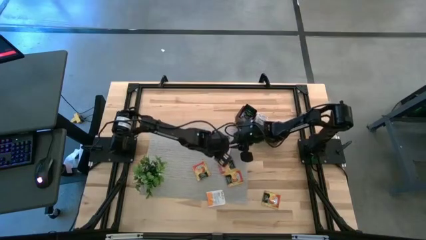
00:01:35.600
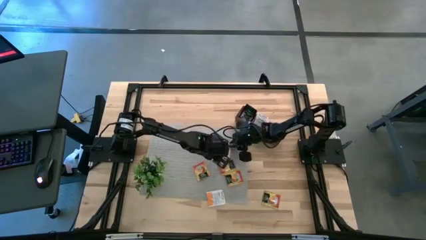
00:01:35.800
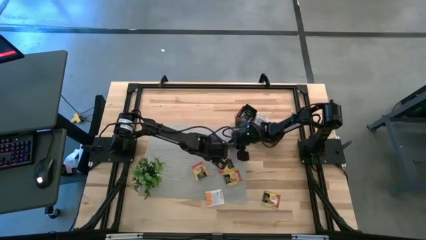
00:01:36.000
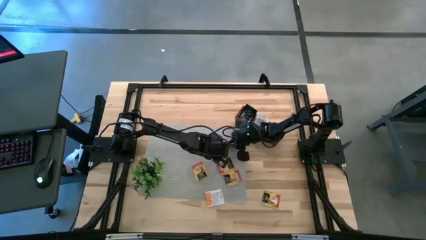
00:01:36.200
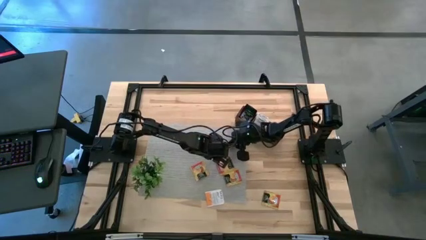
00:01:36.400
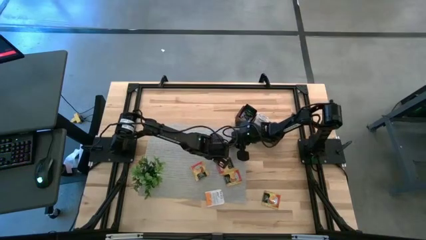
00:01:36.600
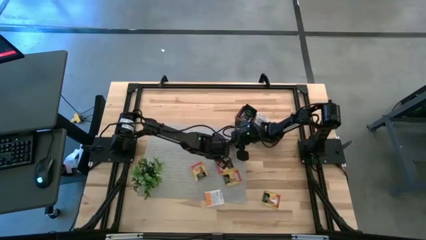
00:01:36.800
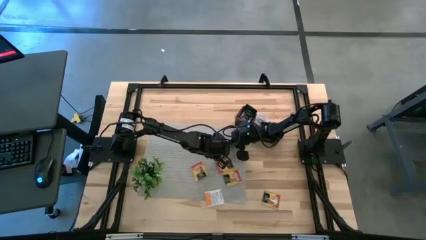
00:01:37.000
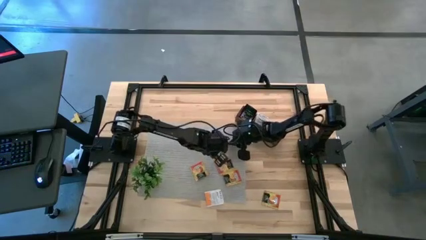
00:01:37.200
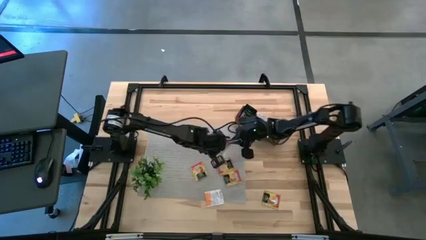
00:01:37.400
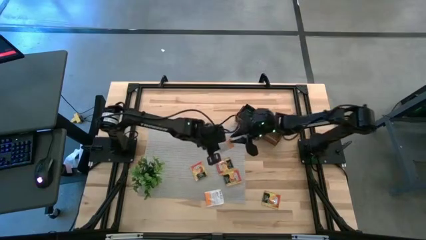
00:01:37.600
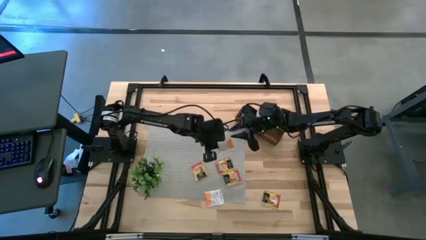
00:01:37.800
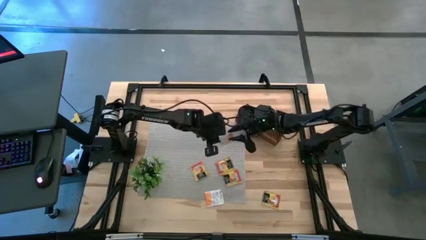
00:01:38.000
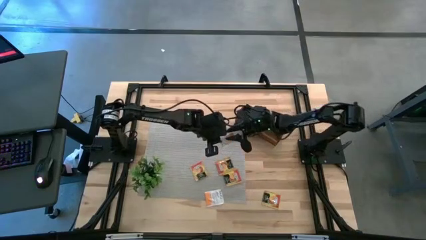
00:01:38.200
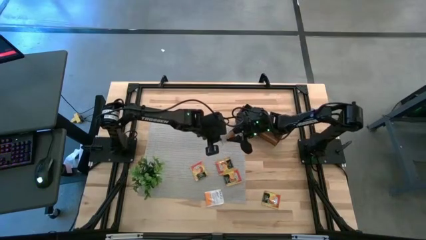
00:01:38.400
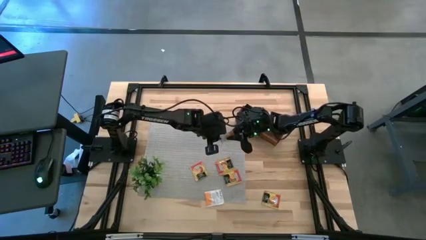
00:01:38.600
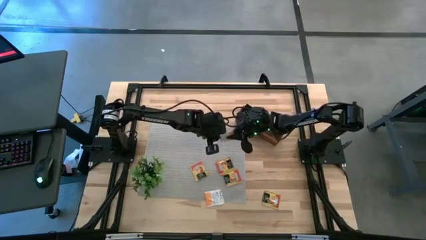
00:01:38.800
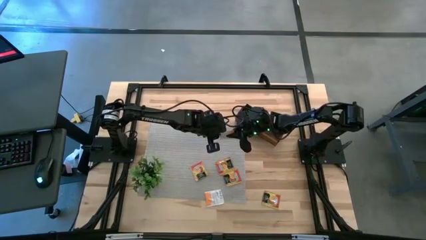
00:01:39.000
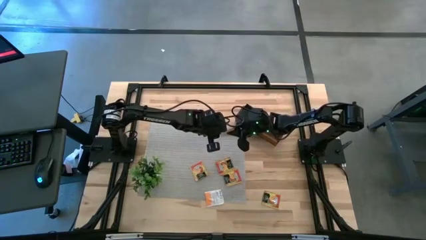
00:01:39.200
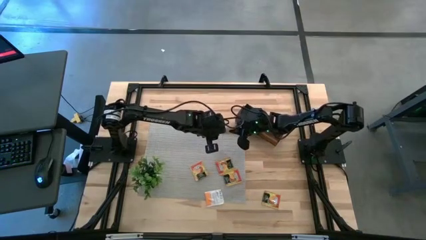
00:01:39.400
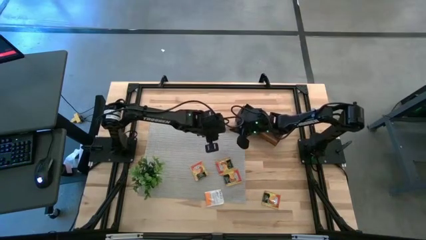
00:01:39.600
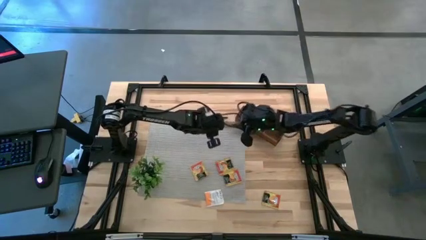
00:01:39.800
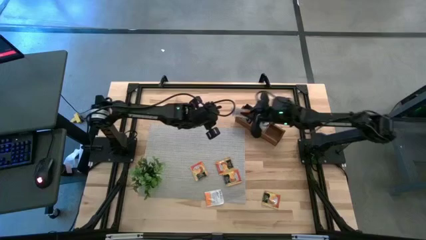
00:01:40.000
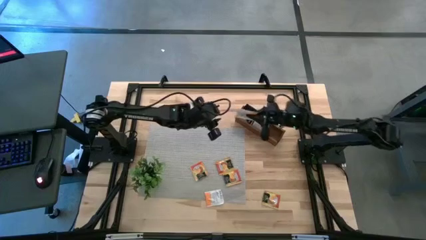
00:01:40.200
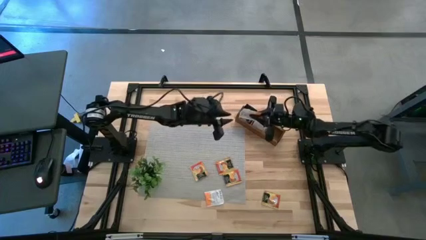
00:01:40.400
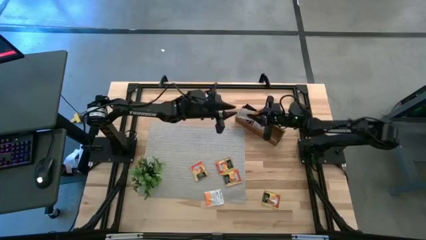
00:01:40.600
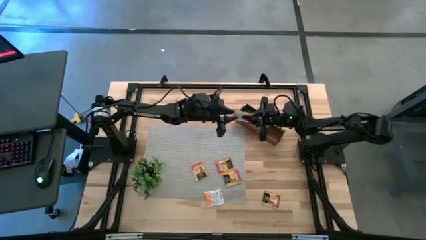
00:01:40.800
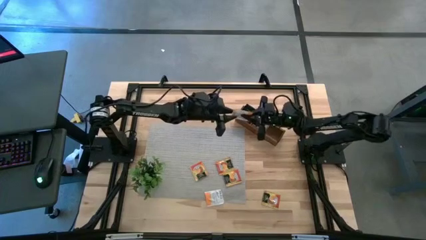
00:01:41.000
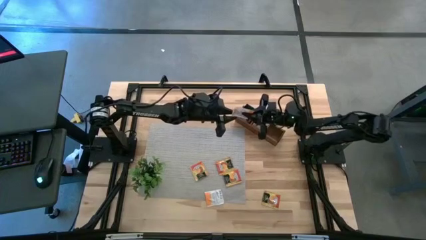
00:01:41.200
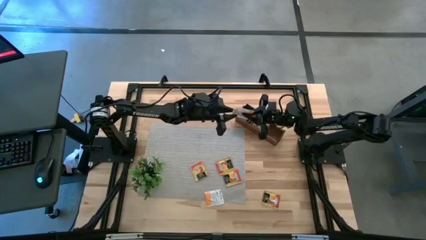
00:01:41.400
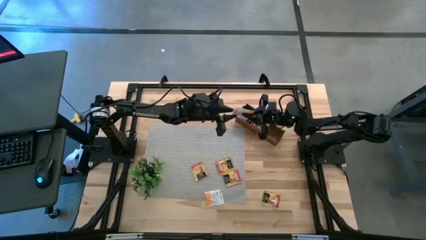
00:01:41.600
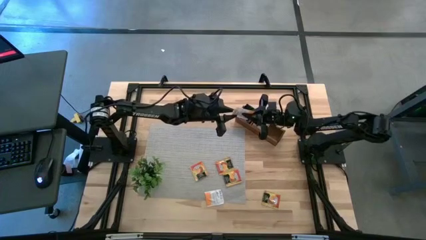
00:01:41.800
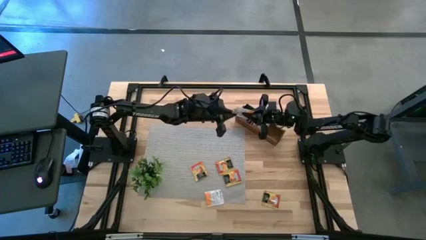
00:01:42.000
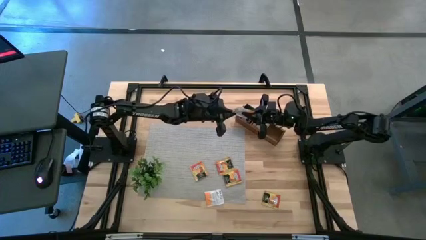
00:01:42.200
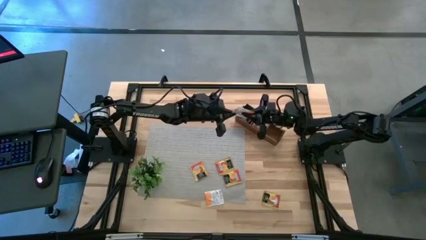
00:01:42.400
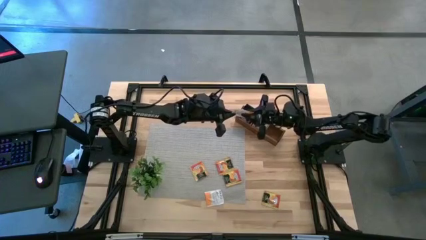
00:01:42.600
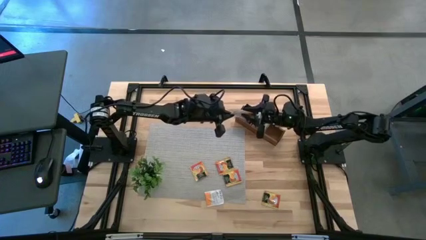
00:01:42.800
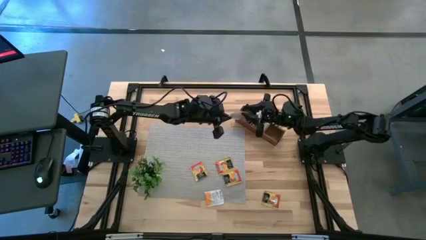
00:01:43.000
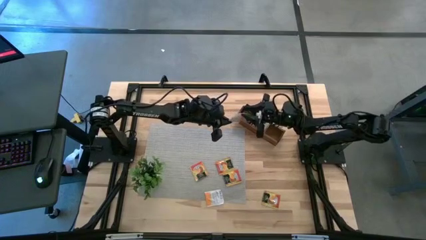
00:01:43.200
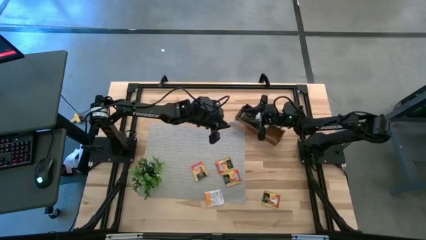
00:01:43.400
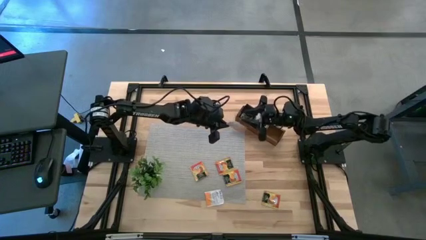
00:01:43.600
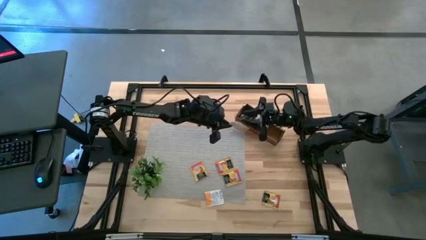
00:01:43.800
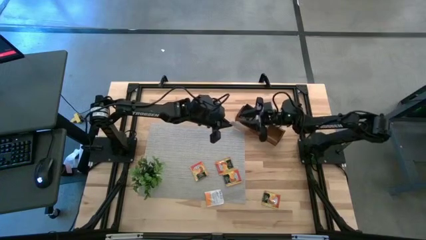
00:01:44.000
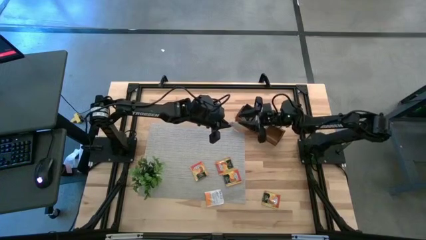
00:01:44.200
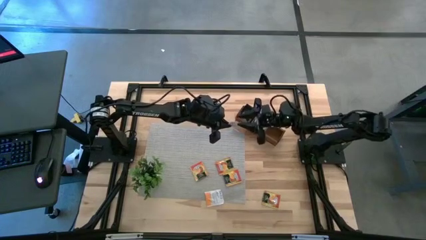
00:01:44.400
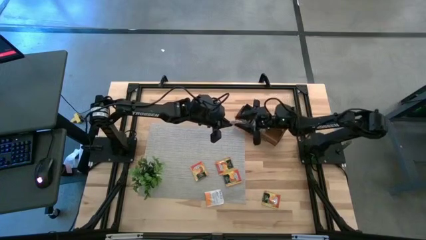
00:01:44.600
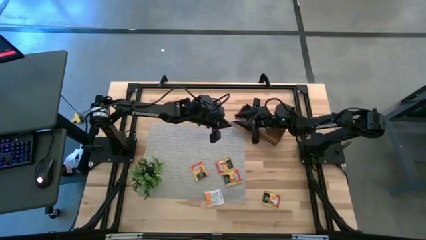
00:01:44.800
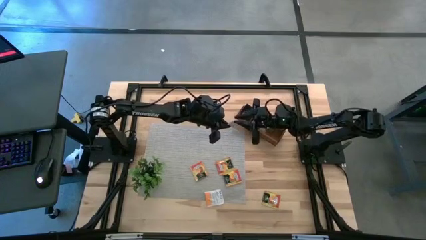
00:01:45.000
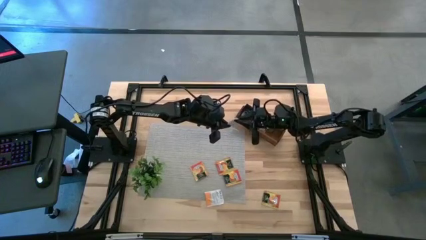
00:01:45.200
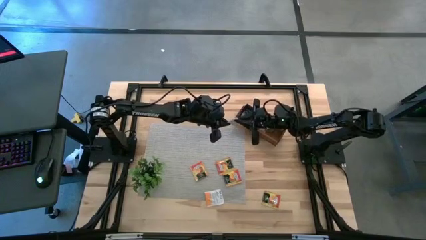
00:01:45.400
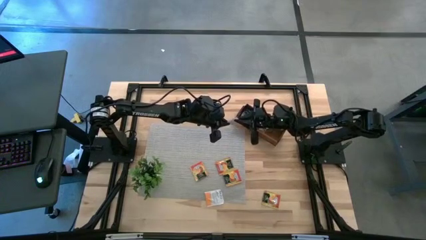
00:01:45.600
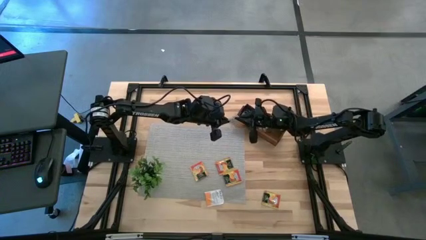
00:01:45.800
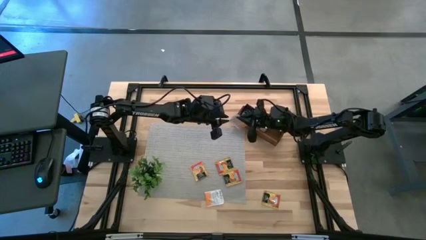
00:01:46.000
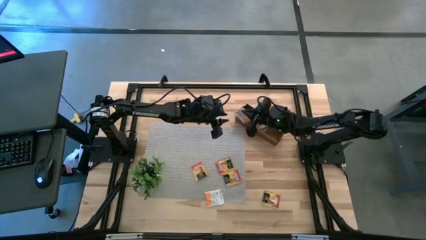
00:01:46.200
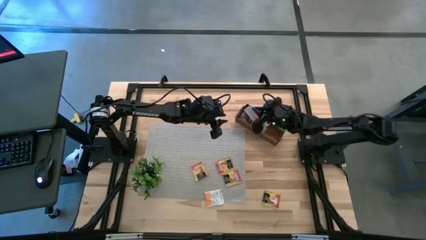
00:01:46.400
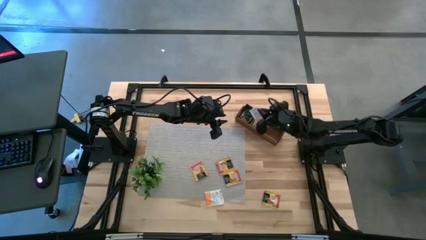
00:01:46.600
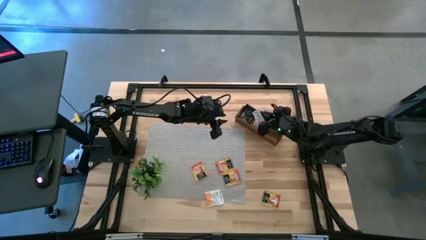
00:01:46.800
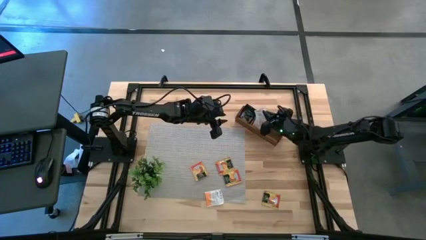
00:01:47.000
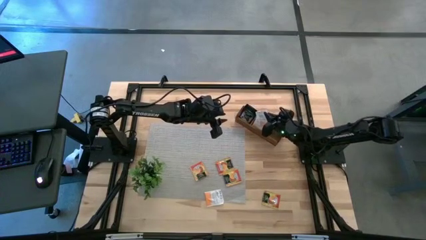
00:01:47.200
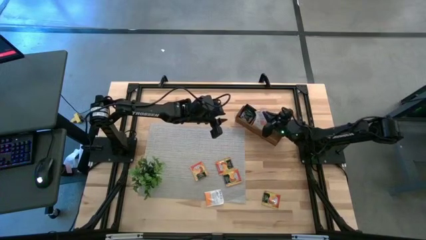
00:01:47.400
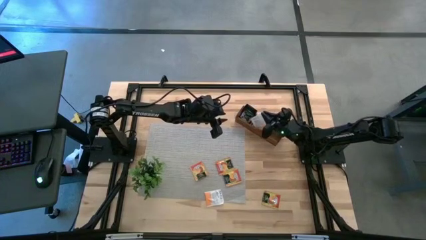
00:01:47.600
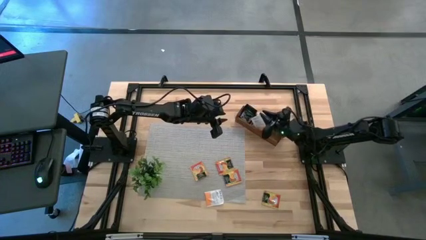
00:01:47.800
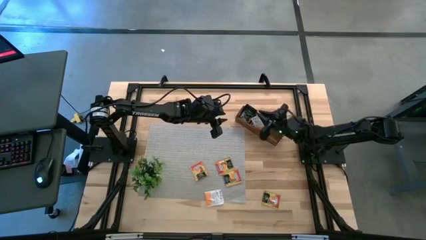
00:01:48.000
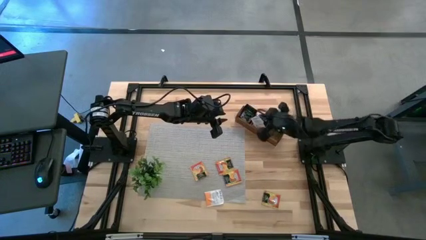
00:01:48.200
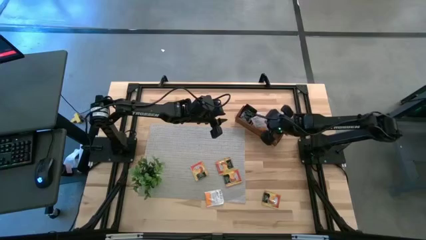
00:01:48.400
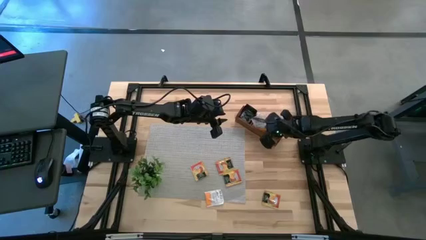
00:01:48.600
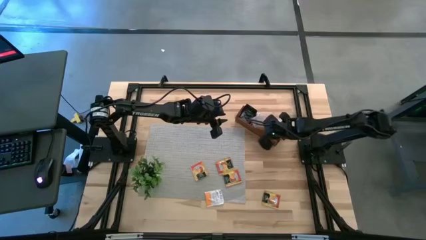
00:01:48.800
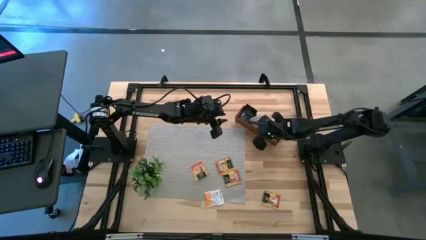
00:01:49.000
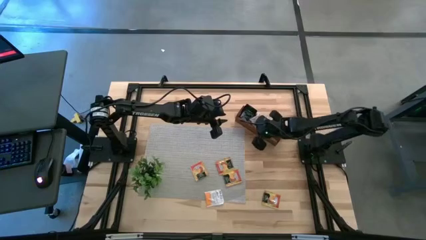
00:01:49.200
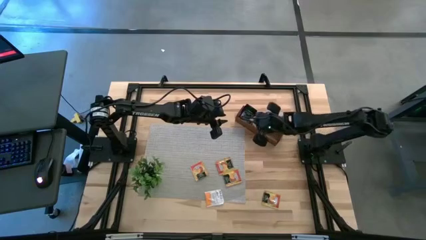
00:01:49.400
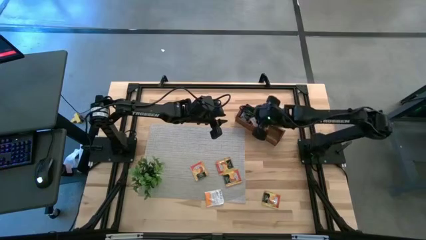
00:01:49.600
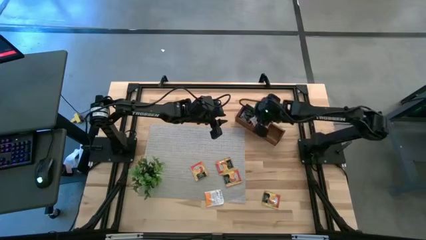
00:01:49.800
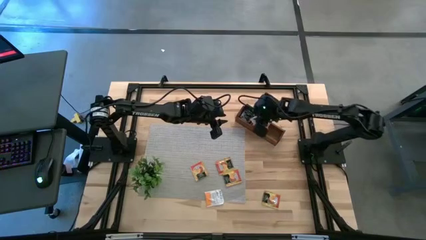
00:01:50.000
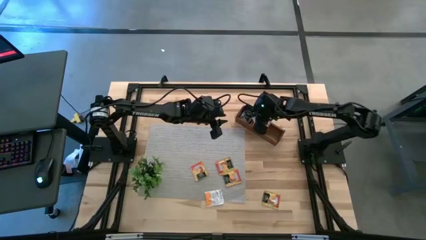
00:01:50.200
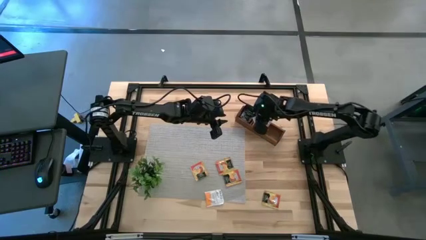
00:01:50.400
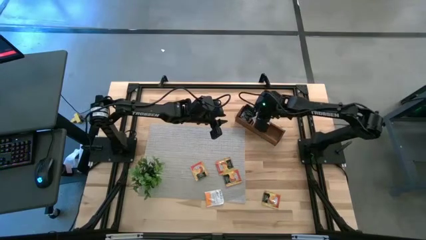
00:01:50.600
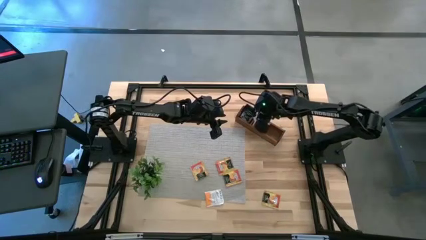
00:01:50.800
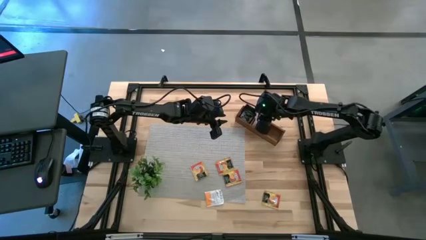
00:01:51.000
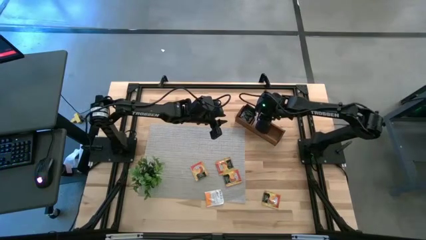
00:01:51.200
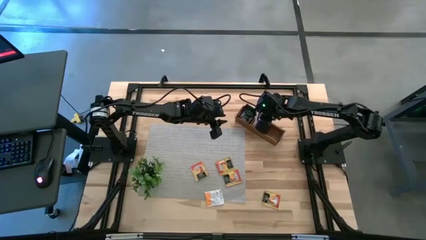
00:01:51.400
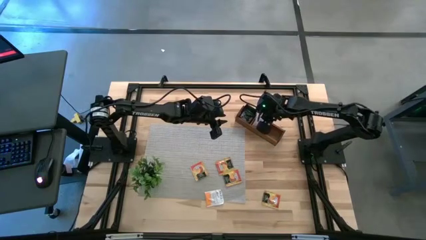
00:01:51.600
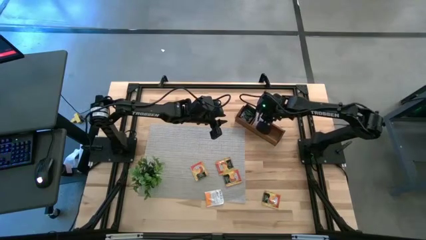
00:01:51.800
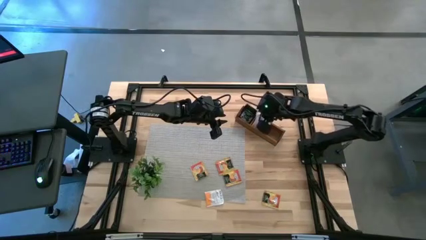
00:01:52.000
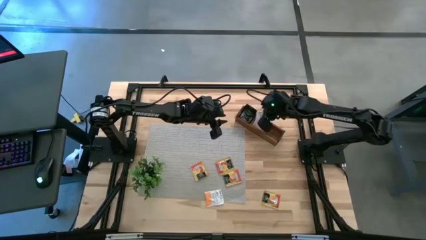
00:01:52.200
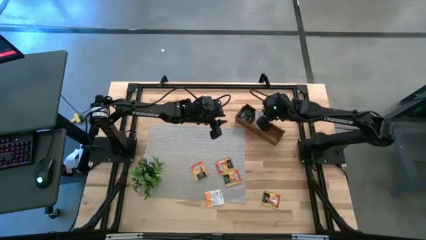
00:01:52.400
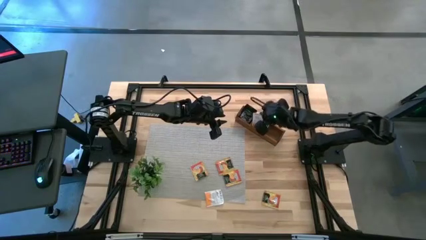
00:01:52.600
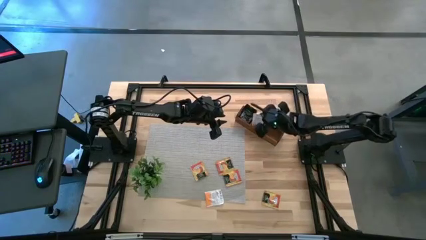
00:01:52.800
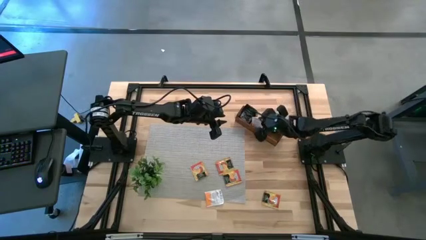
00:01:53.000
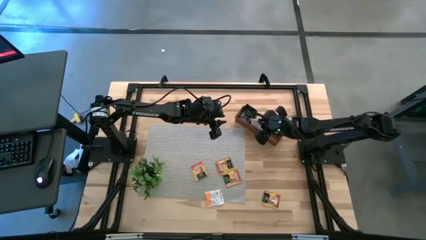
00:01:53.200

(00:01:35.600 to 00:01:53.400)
Task: Pick & Place Tea
Put the orange tea bag into the middle section of the wooden organizer
